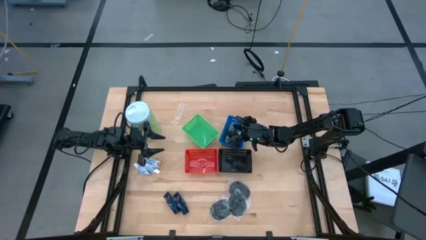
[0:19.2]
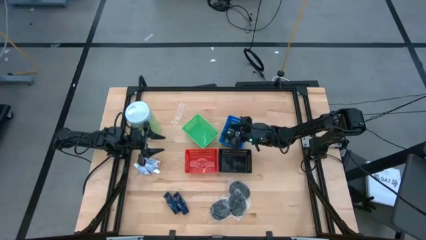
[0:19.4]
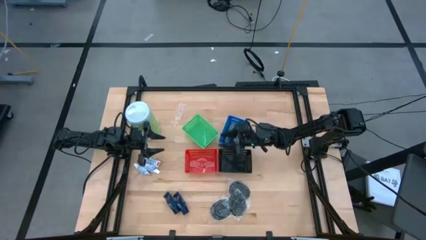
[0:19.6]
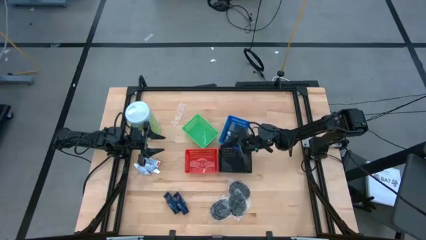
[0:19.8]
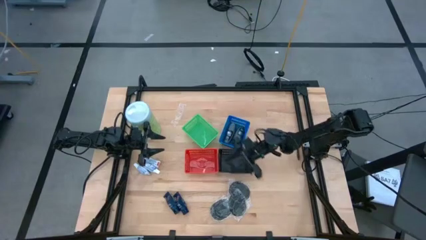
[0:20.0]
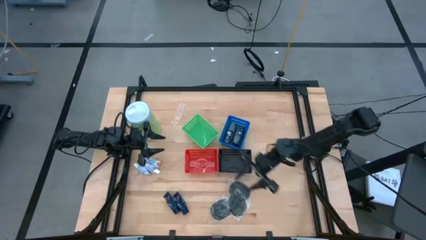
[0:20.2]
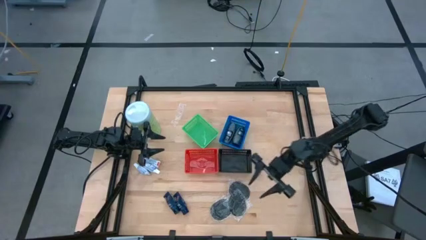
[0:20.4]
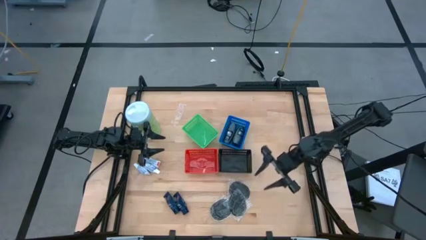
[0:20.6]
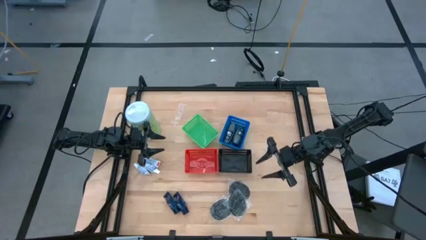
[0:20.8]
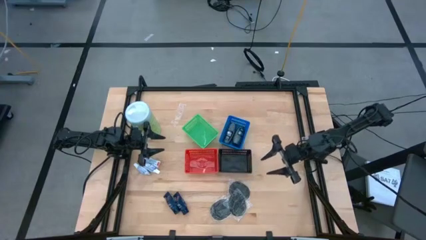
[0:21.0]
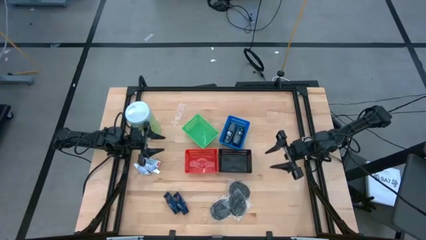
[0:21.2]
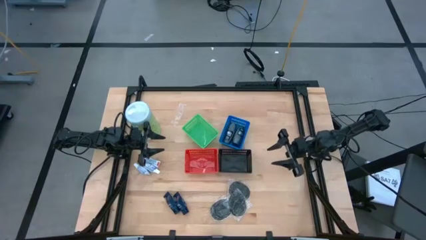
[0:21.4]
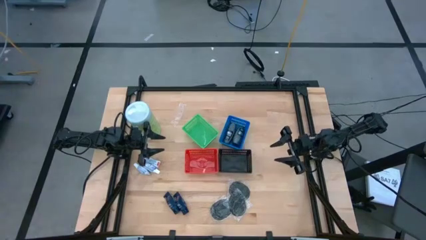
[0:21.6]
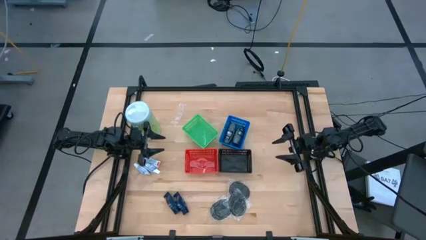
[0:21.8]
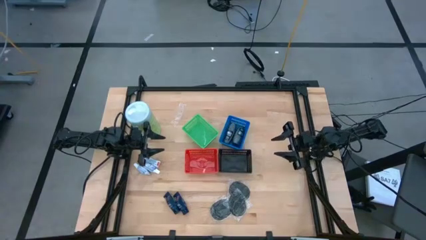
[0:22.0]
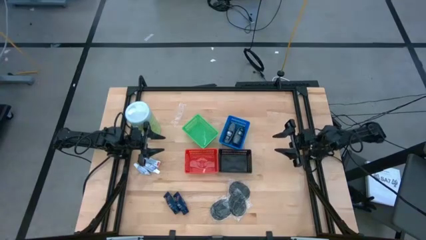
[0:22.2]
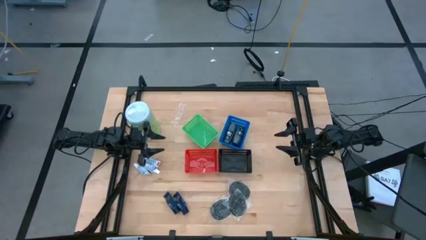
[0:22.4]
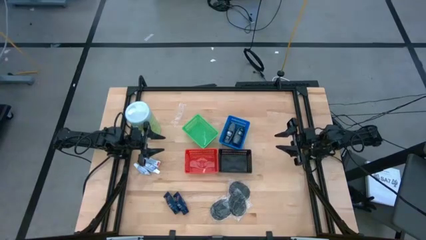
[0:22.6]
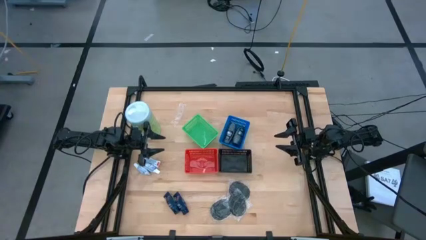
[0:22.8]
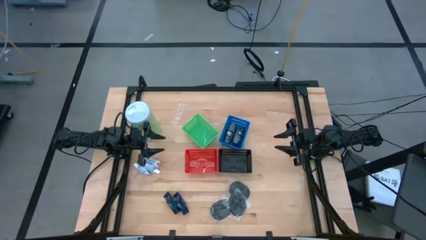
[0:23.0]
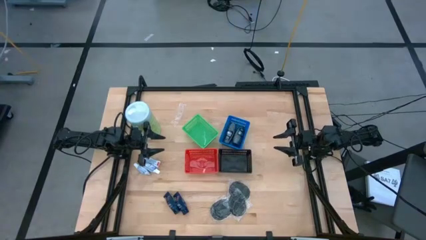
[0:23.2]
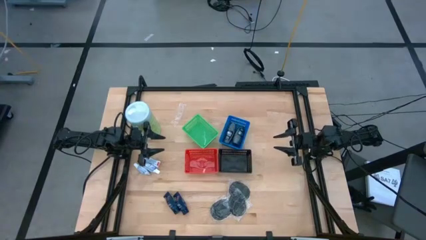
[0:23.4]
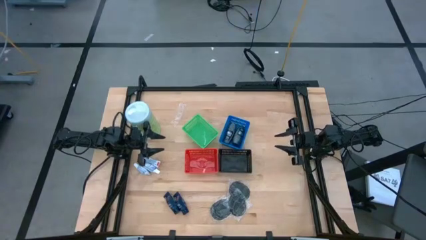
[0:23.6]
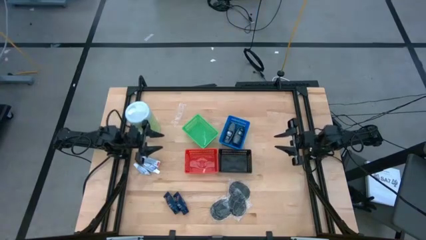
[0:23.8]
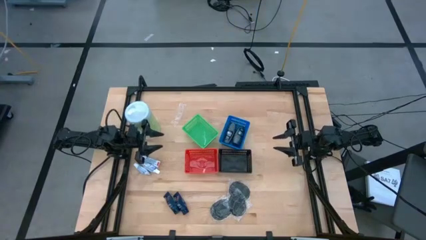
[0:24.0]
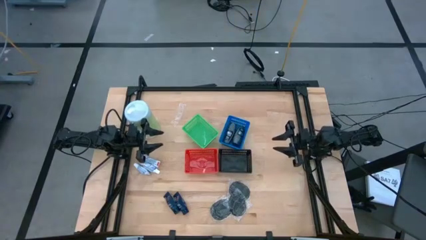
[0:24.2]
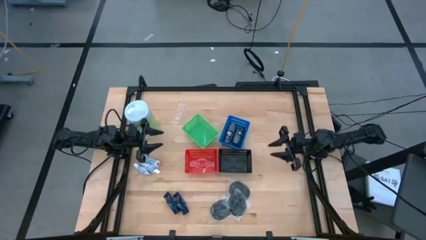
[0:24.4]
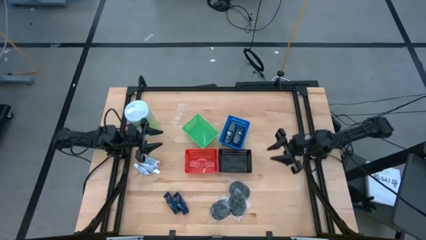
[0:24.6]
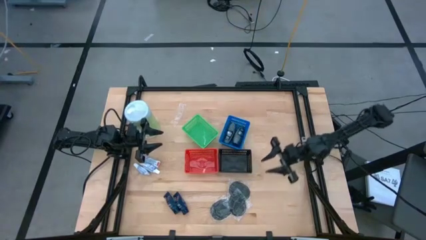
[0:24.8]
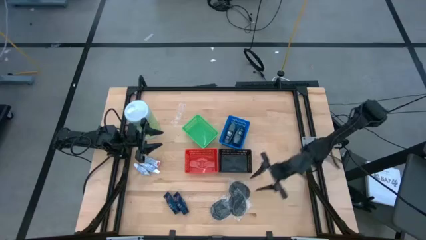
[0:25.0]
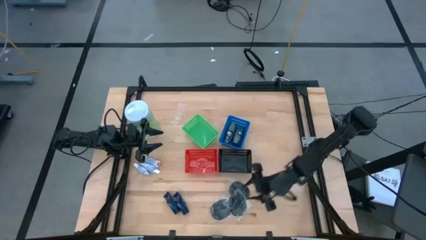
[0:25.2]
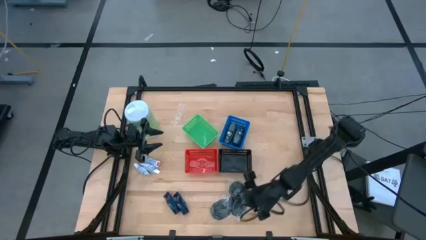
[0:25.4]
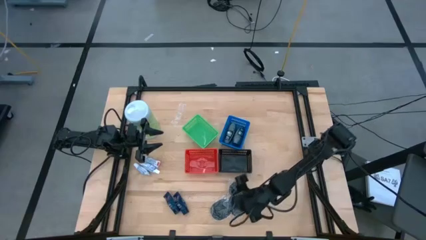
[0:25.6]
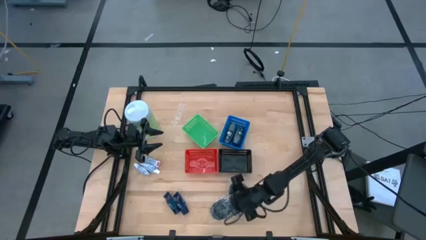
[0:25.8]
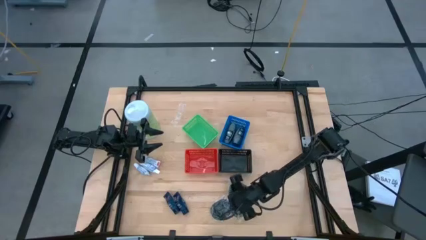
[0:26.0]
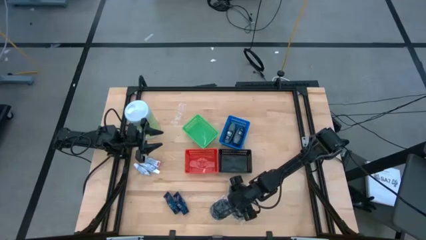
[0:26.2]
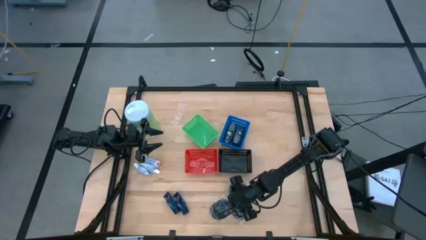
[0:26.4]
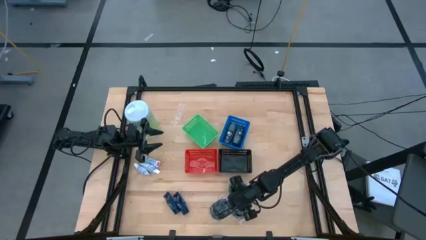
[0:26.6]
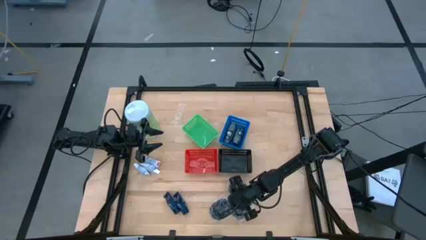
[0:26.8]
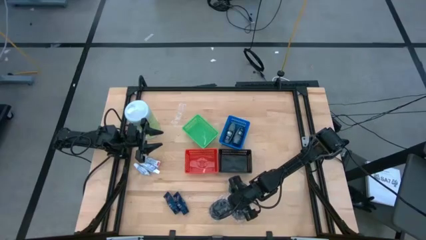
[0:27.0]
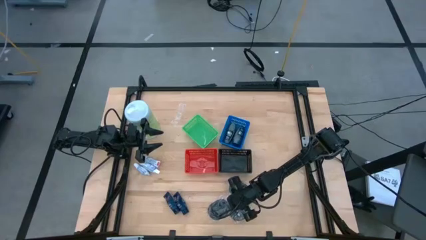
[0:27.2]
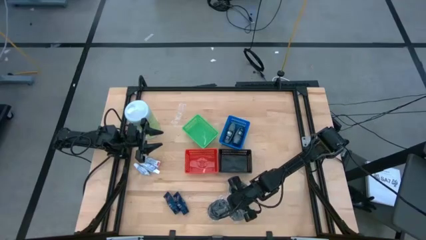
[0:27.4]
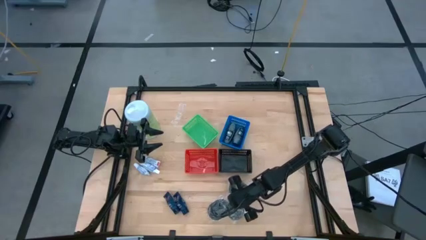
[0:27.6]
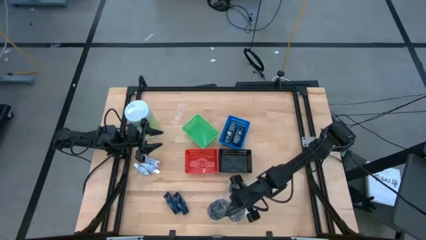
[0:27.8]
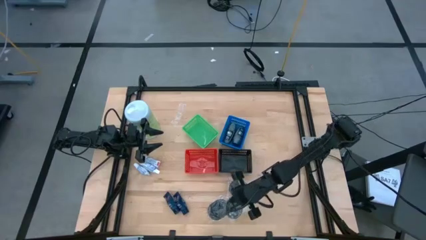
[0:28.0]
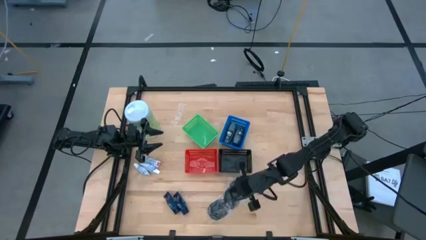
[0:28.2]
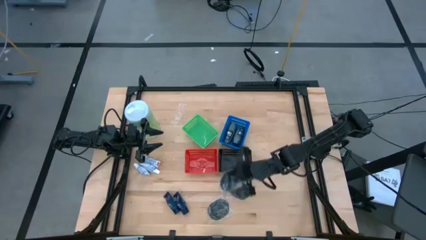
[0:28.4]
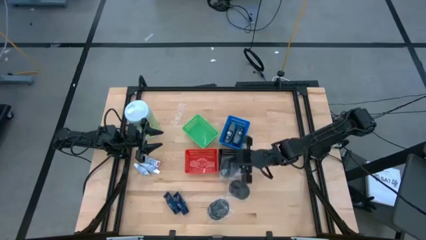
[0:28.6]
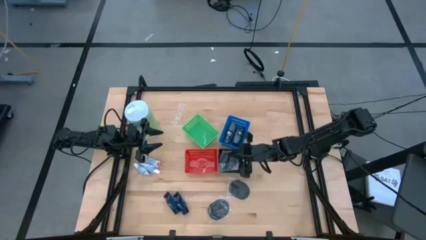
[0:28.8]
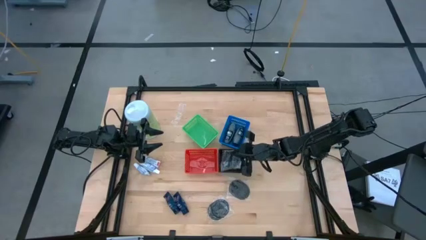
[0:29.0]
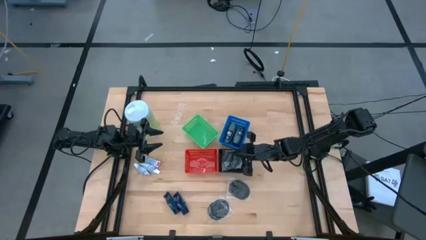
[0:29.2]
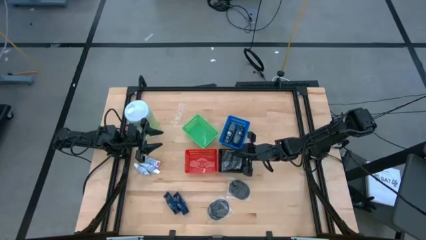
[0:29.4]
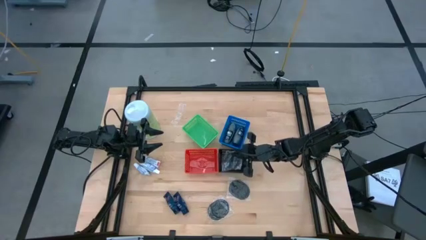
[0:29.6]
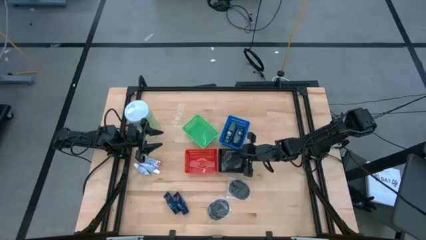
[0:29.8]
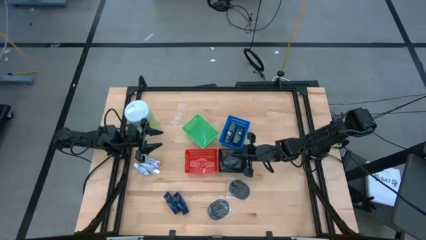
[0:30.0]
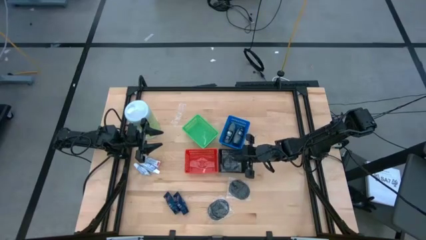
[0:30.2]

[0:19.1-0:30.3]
Task: Pick & Place Travel size toiletries
Put the bottom right hairbrush into the black bin

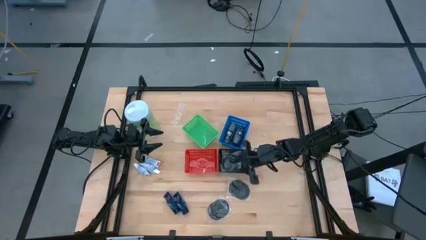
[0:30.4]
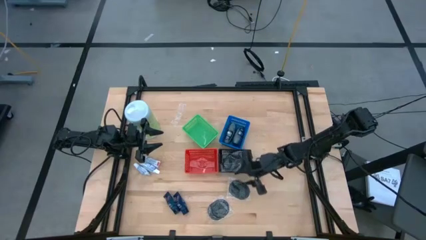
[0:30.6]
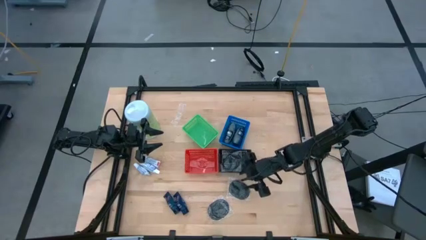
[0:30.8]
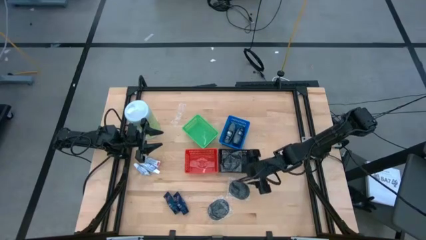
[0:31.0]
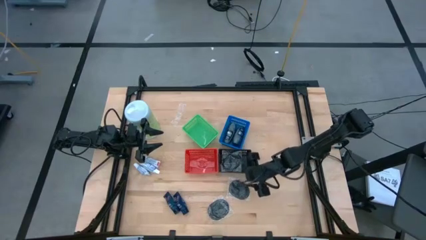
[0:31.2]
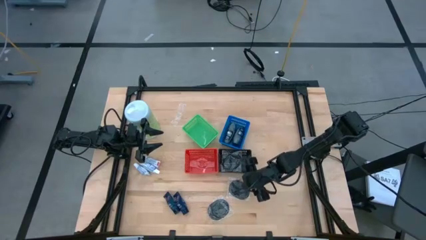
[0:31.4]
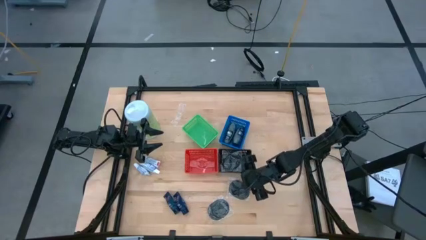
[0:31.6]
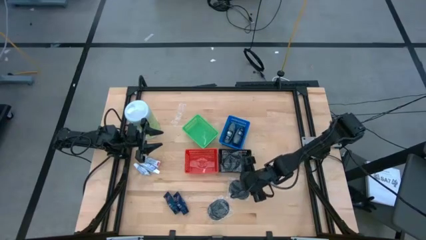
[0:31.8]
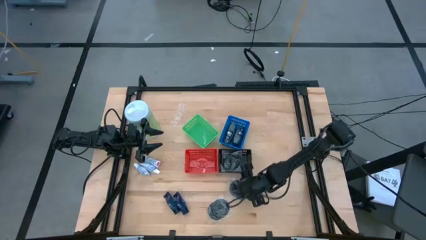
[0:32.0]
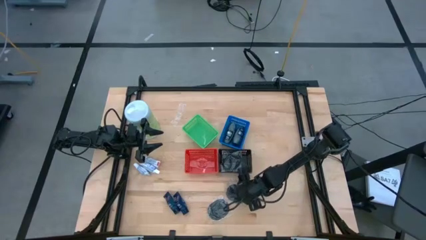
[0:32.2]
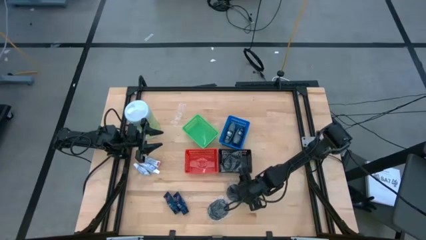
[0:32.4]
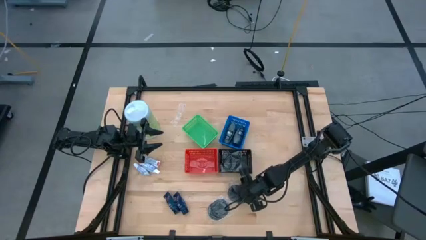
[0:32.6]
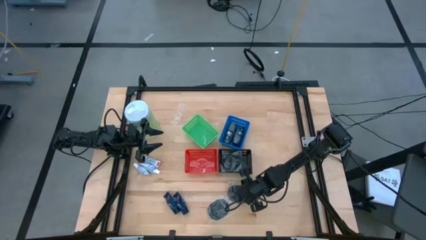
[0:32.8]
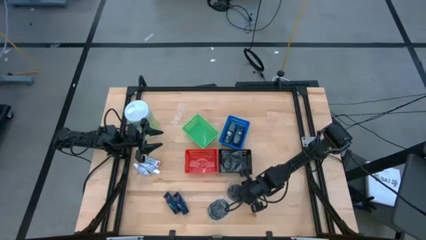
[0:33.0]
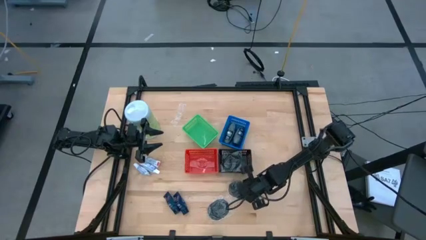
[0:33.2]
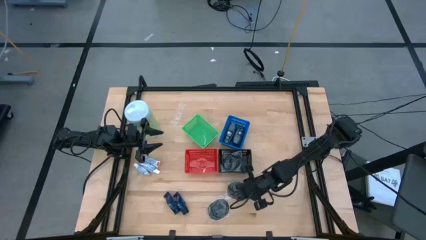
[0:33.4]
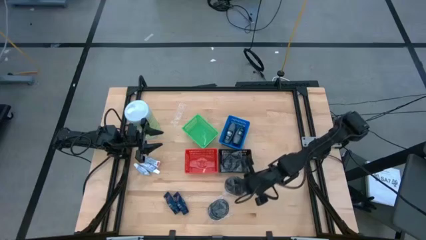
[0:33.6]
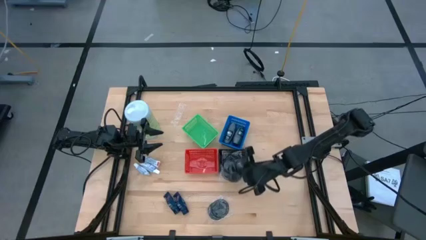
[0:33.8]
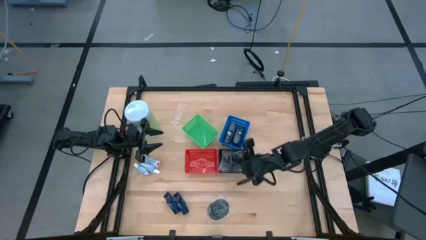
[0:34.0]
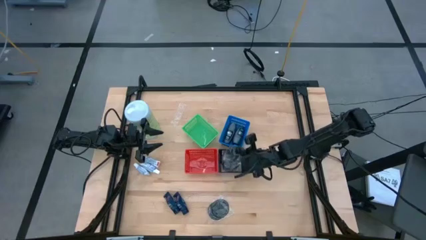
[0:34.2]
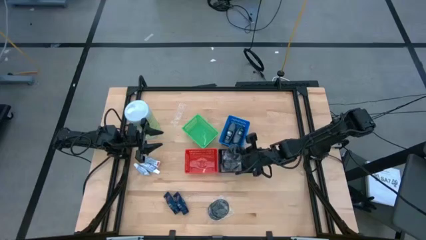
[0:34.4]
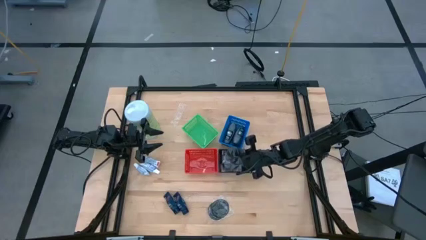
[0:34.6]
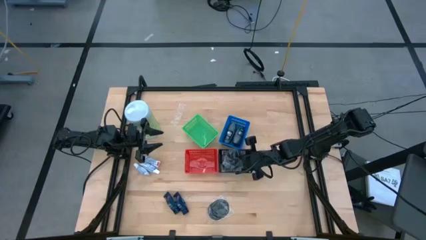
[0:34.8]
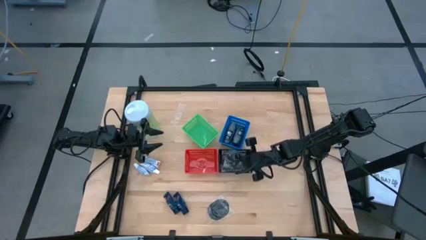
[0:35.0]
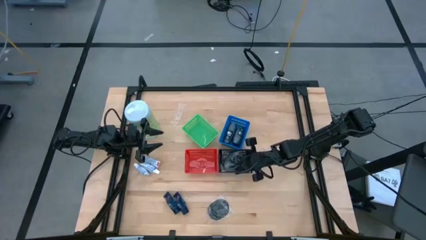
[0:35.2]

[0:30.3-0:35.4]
Put the top hairbrush into the black bin
